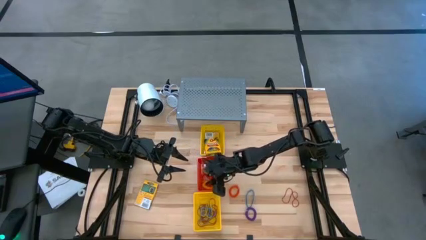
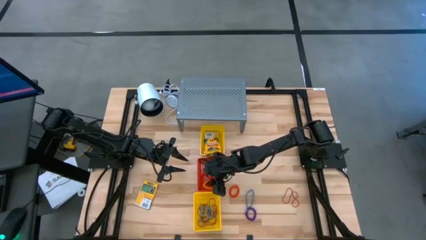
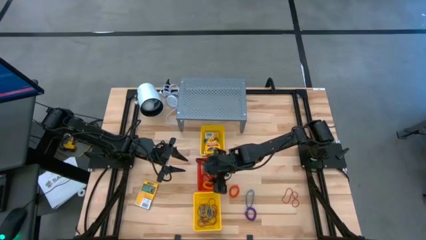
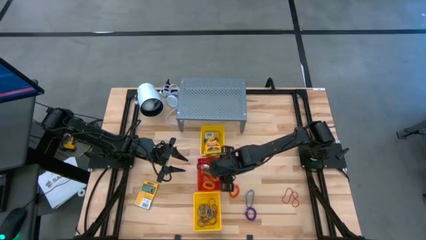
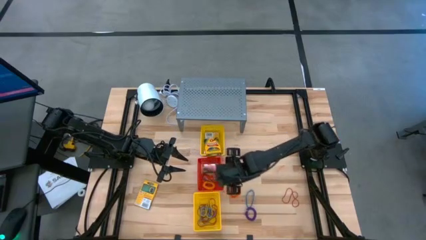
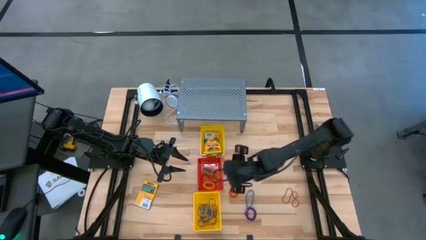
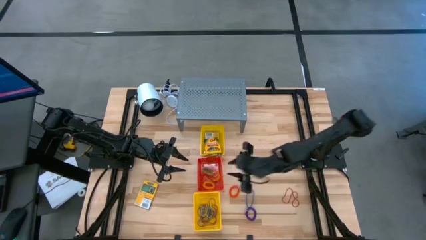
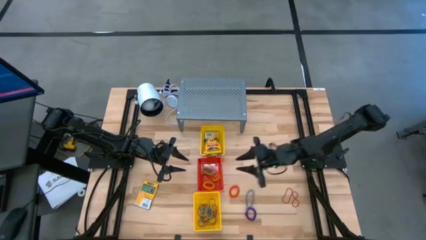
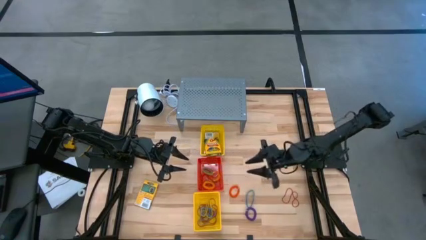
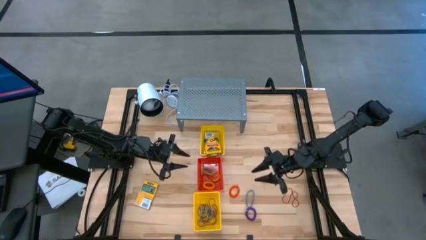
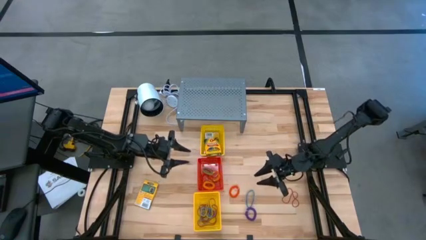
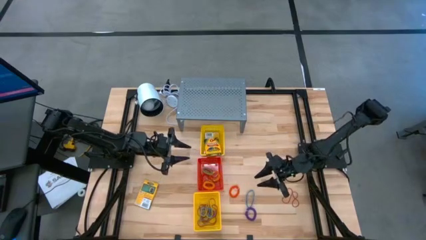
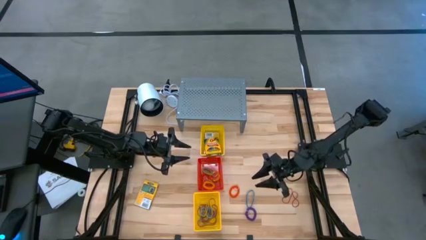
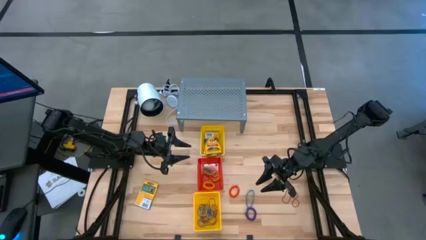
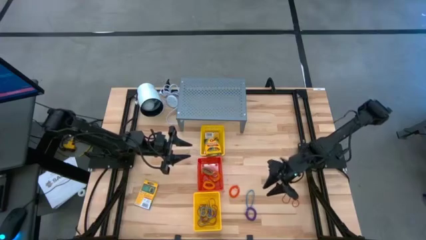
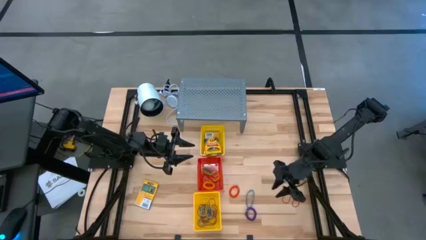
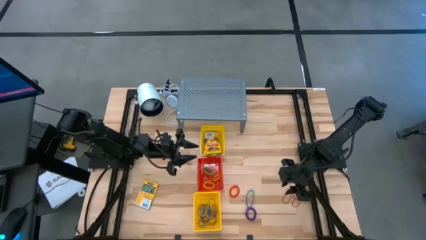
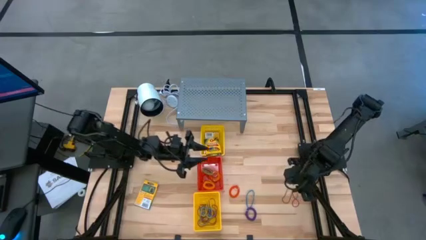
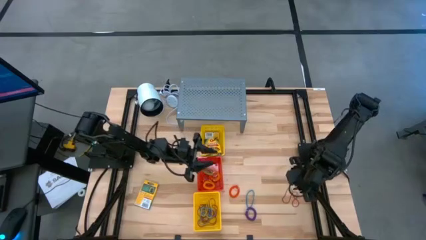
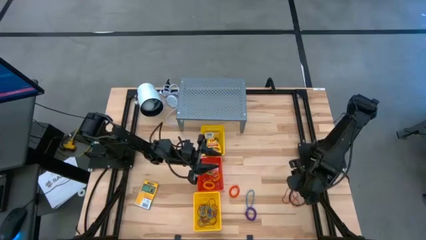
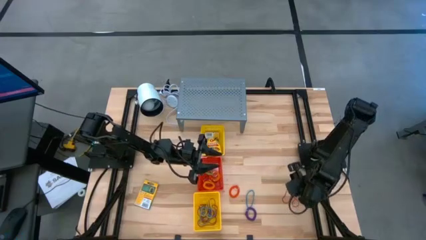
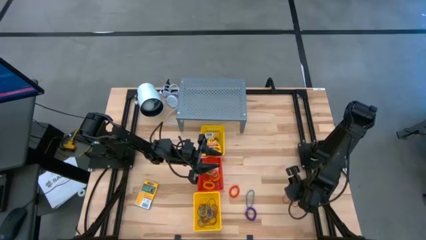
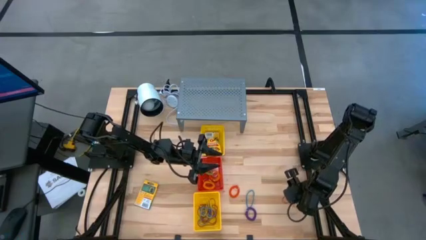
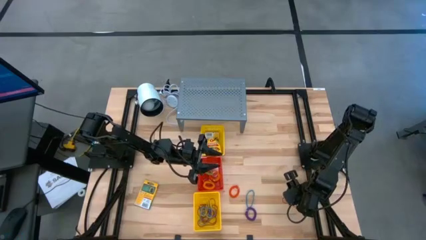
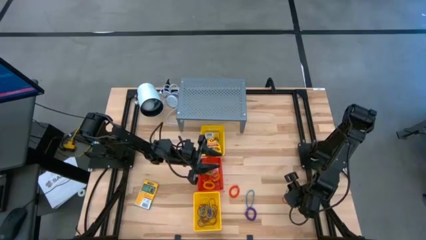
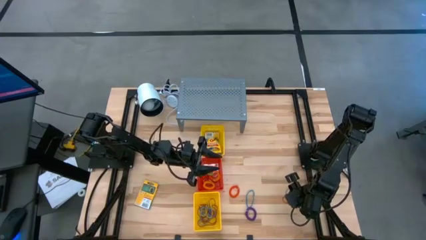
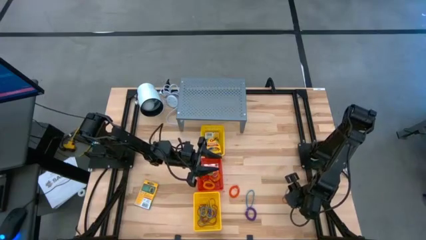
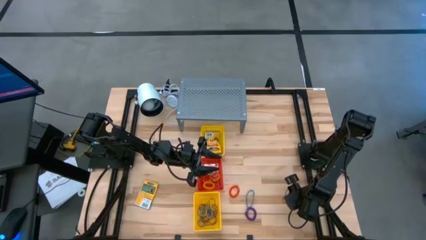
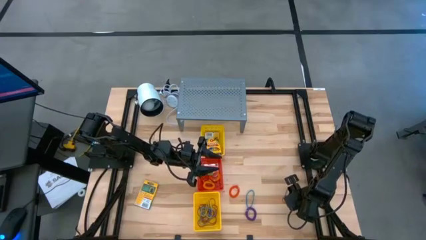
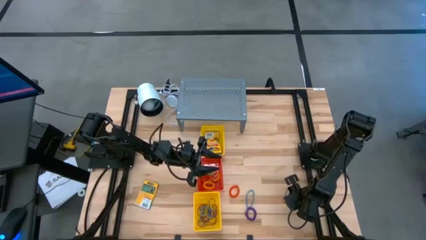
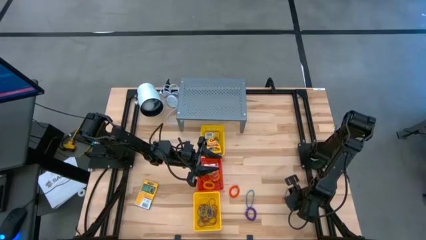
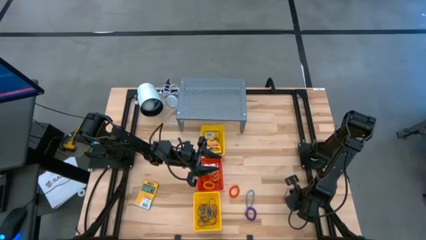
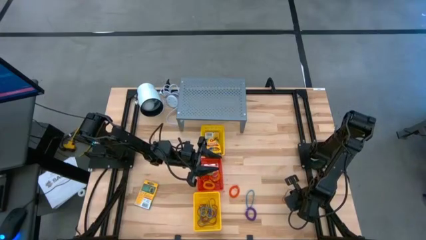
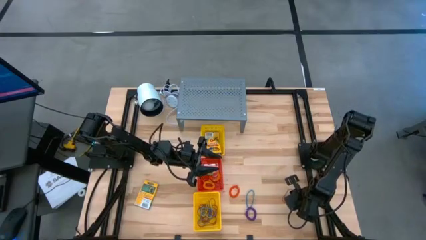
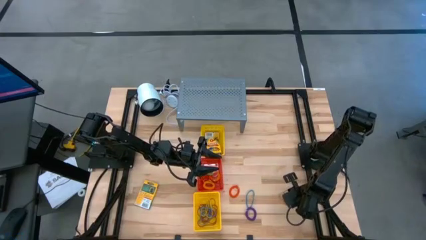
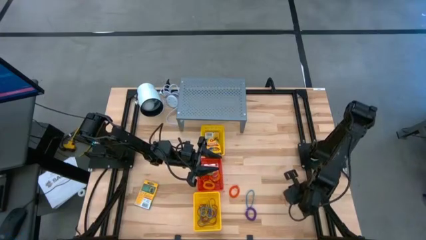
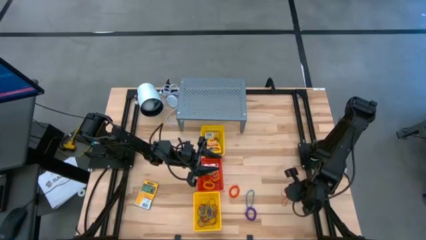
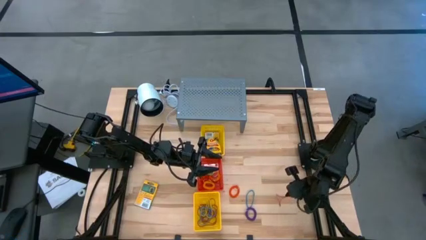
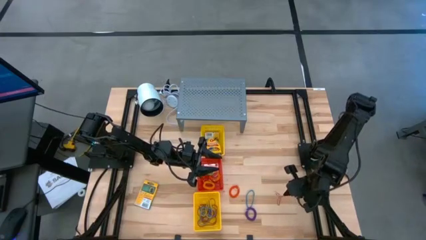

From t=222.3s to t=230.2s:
Task: Pick & Place Office Desk Supplies
Put the red rubber band into the bottom yellow bin

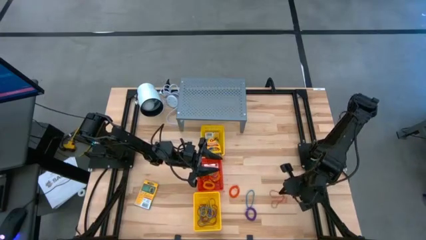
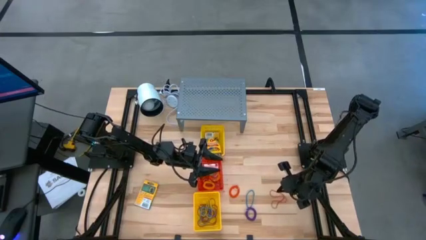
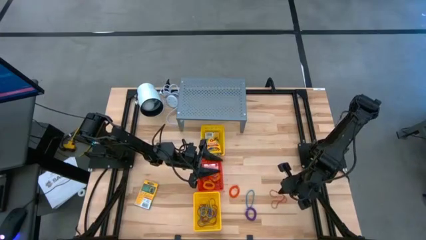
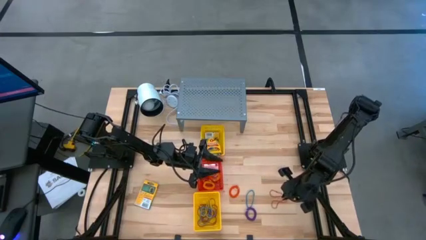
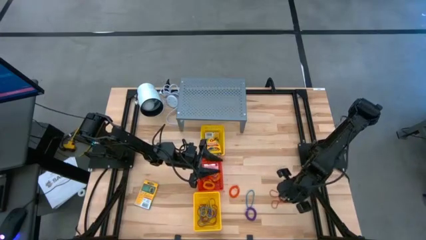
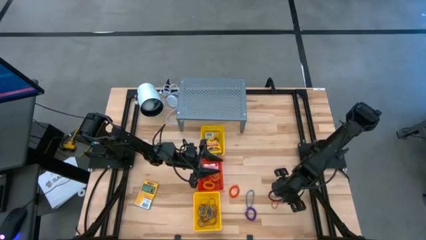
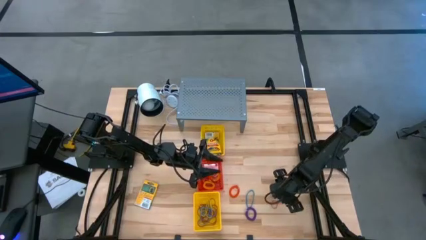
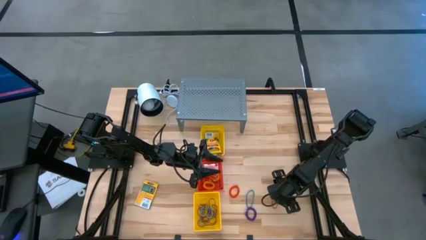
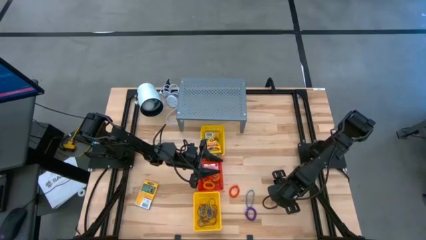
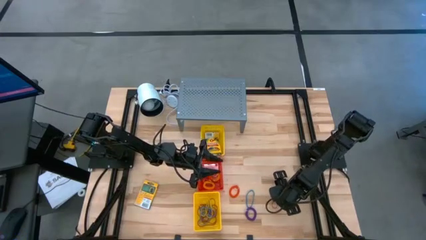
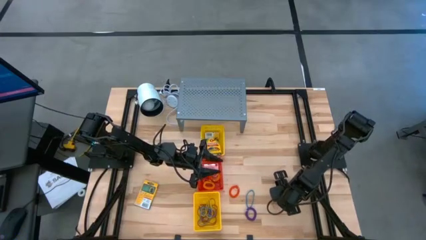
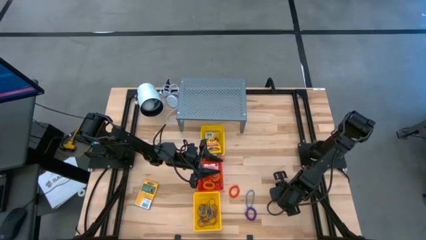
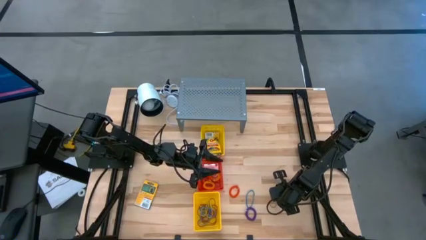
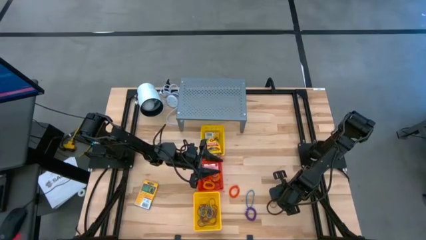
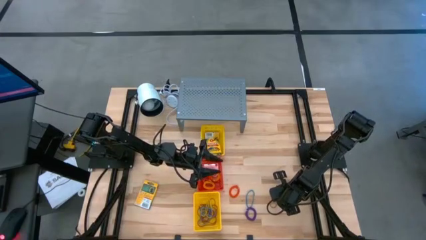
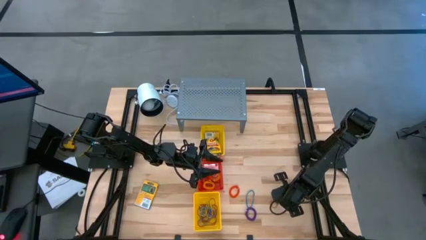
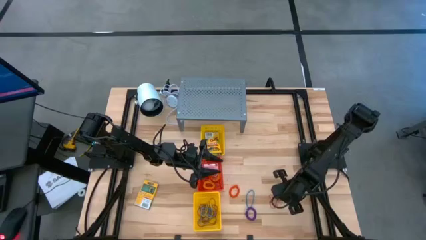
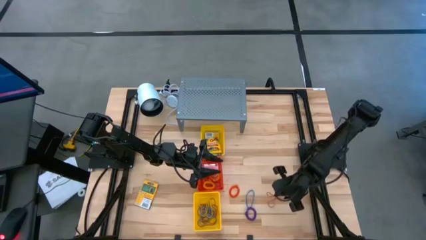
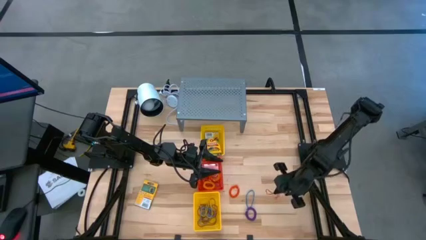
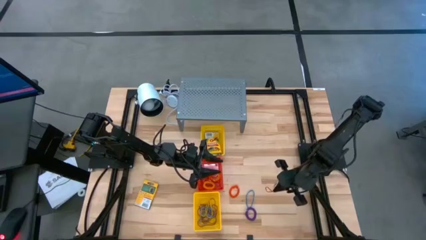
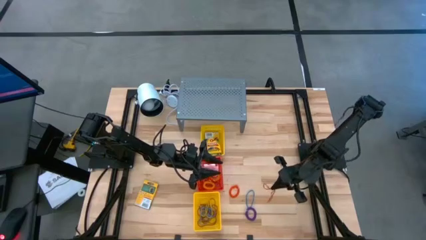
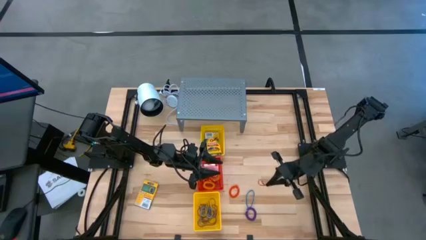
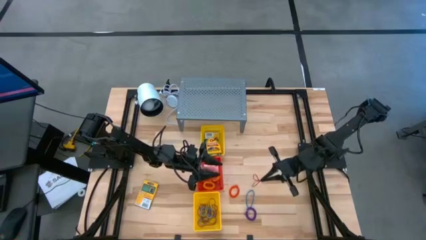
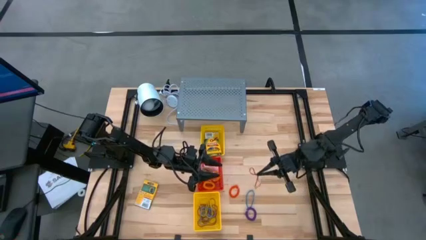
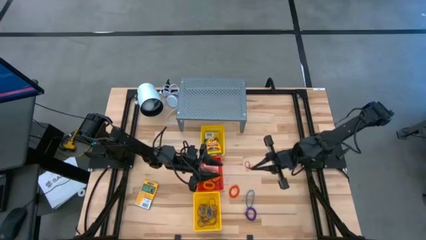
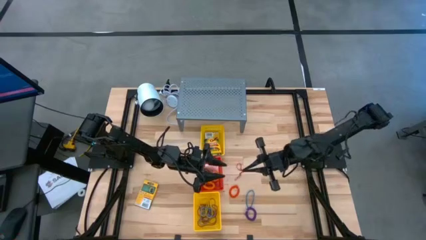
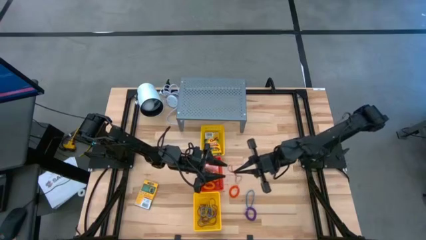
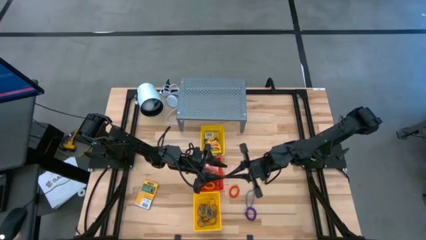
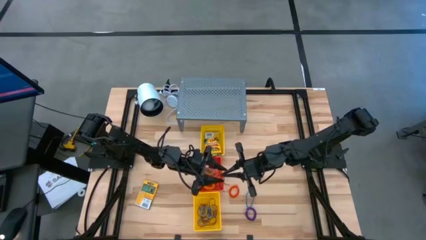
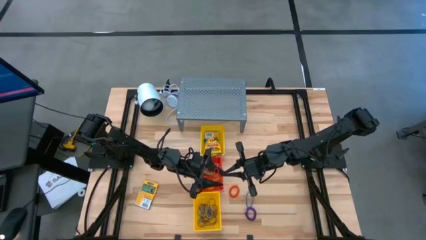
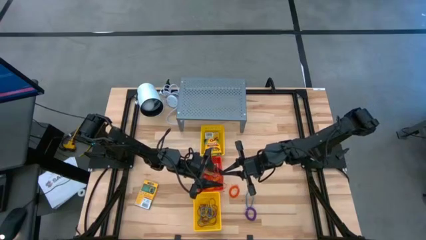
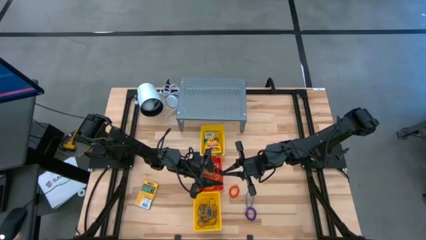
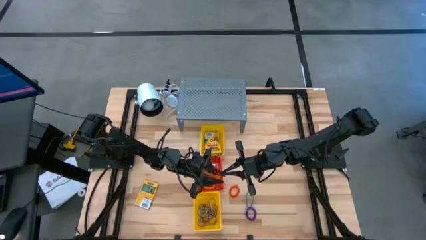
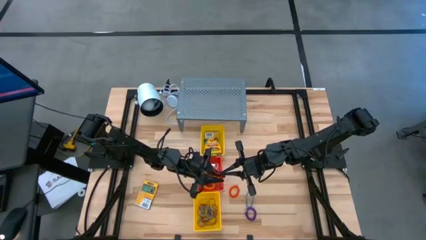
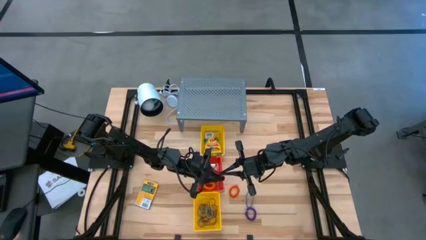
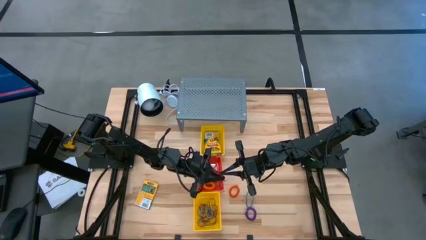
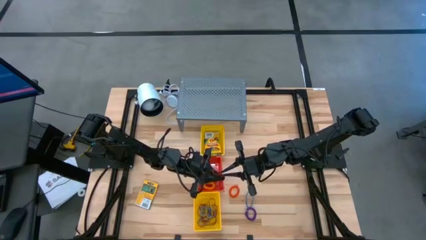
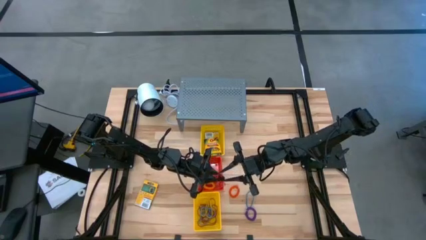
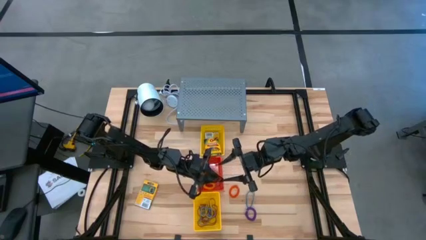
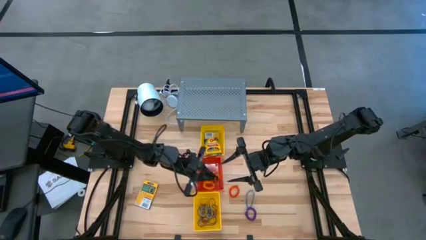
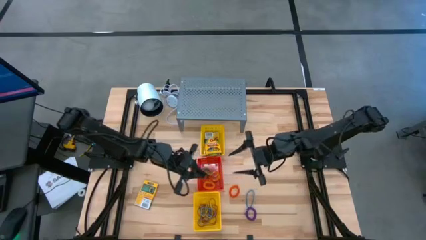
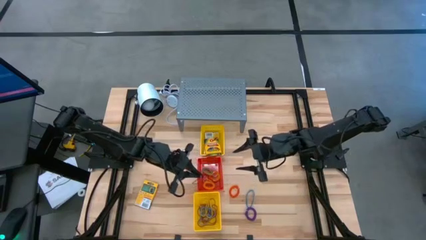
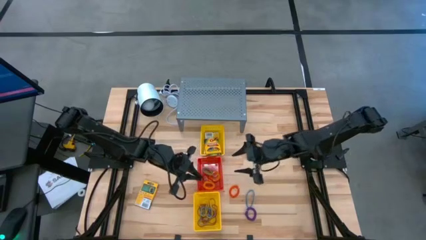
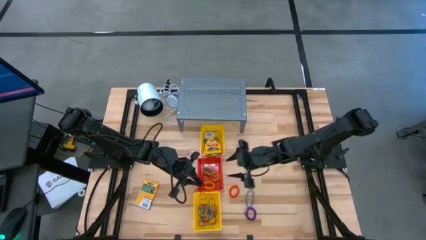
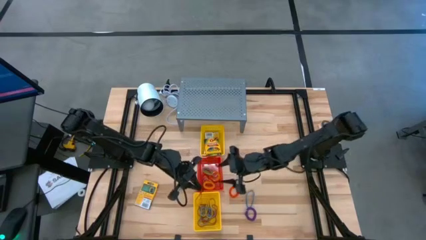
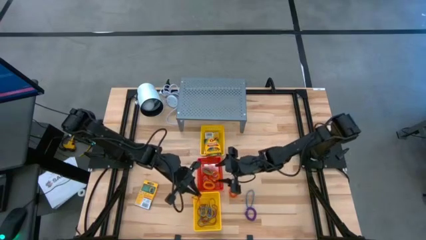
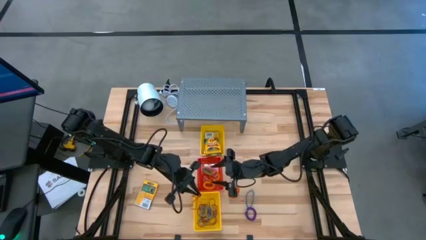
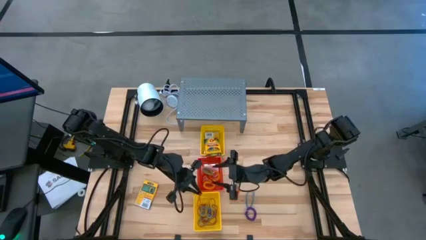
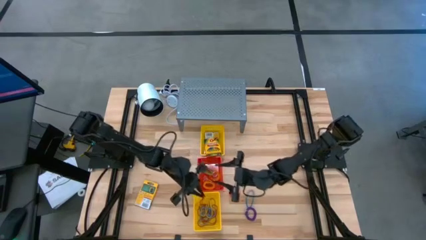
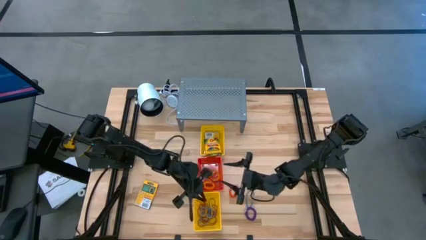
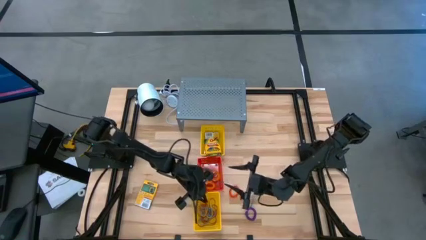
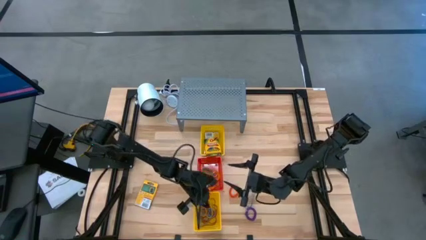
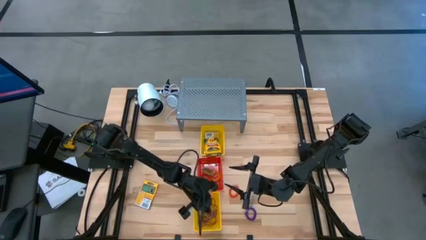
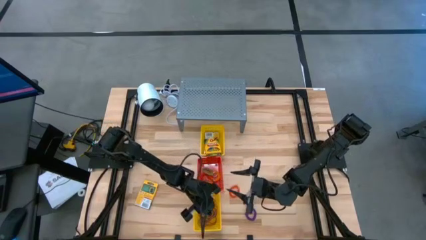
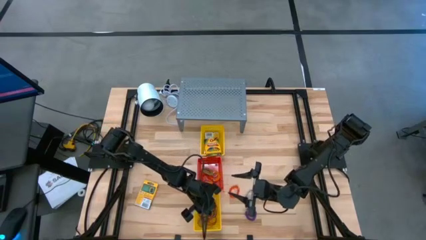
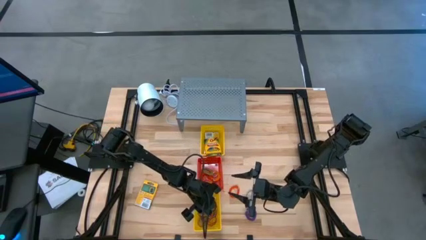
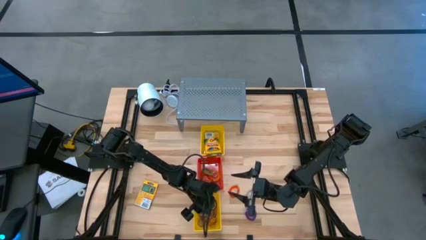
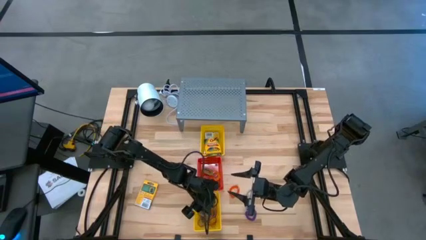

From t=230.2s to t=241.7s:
Put the red rubber band into the bottom yellow bin
